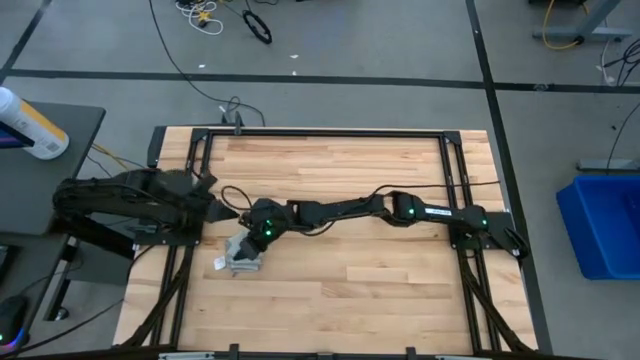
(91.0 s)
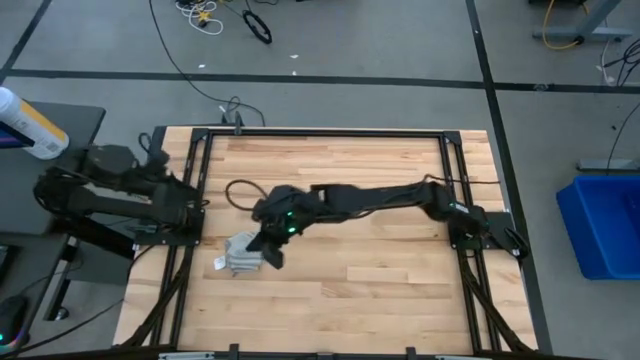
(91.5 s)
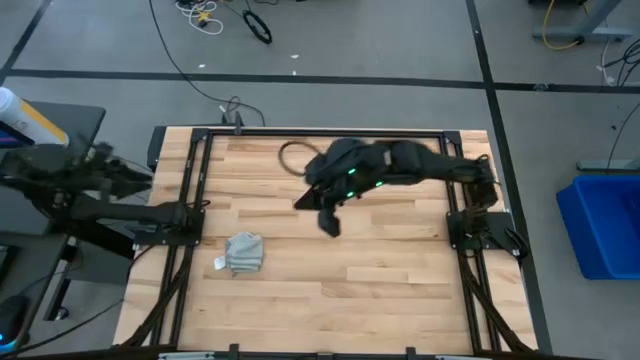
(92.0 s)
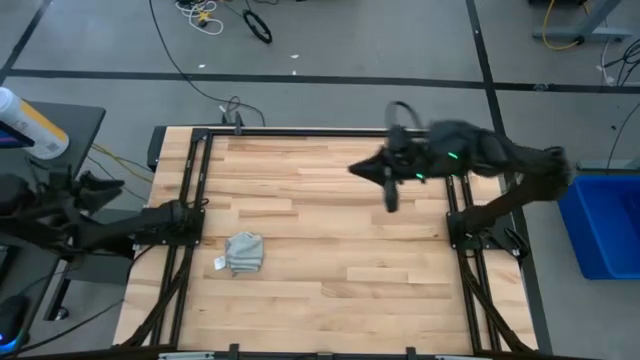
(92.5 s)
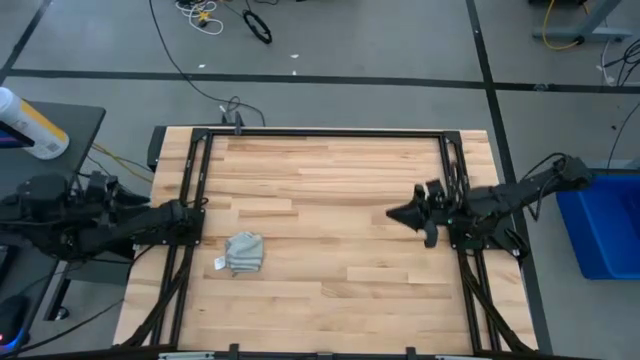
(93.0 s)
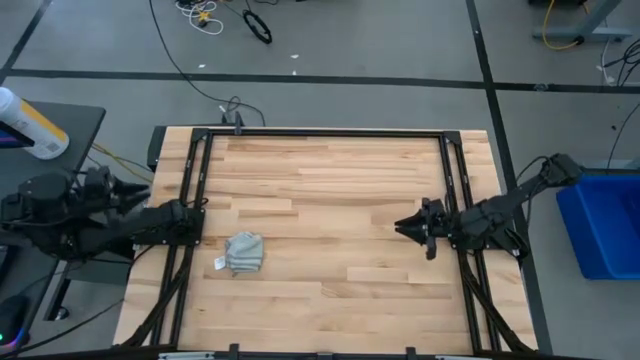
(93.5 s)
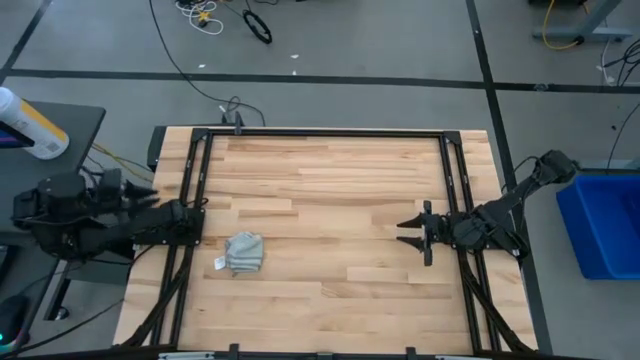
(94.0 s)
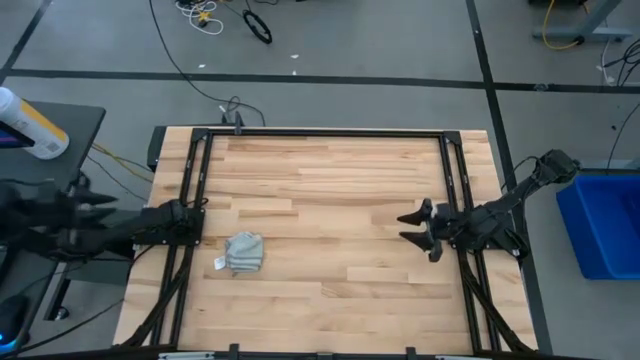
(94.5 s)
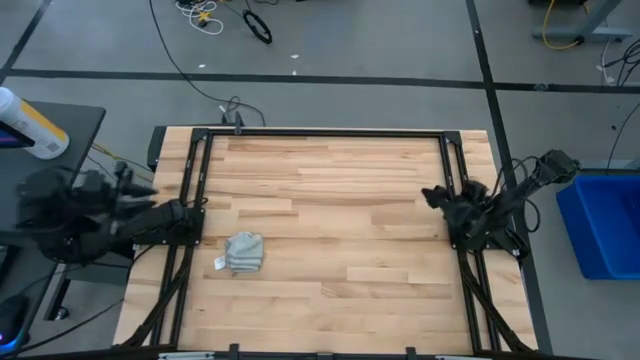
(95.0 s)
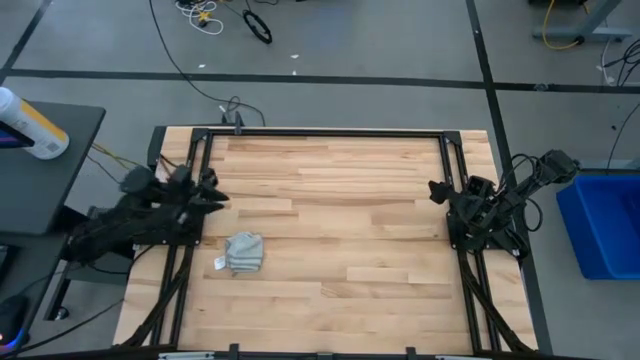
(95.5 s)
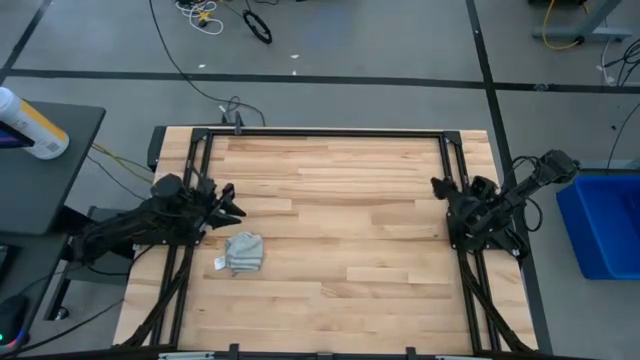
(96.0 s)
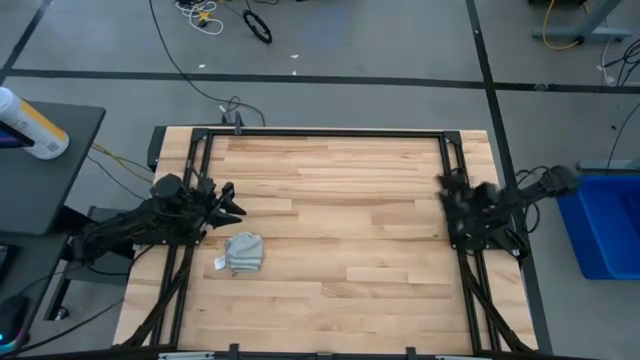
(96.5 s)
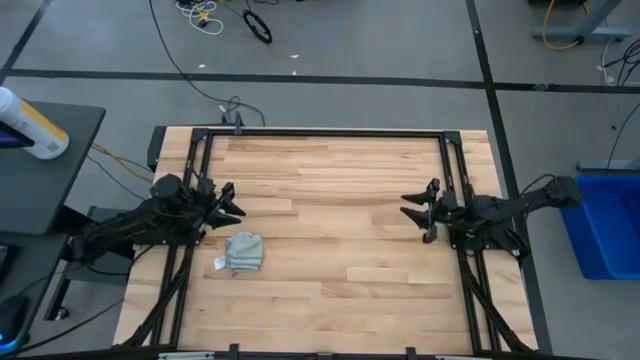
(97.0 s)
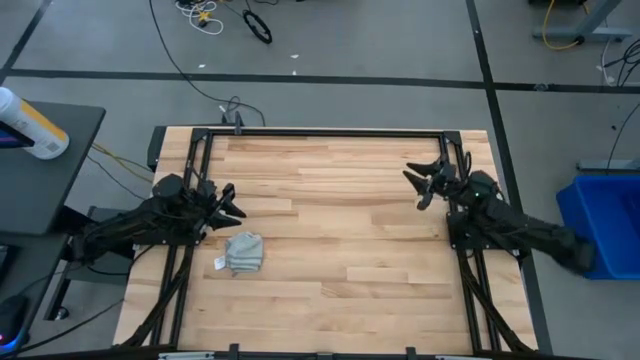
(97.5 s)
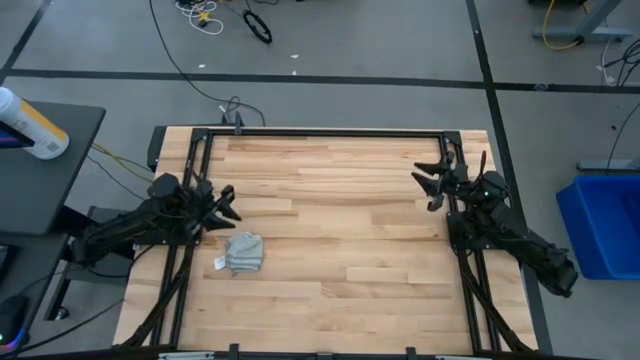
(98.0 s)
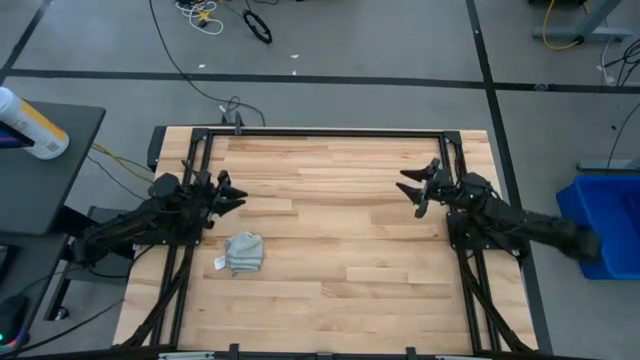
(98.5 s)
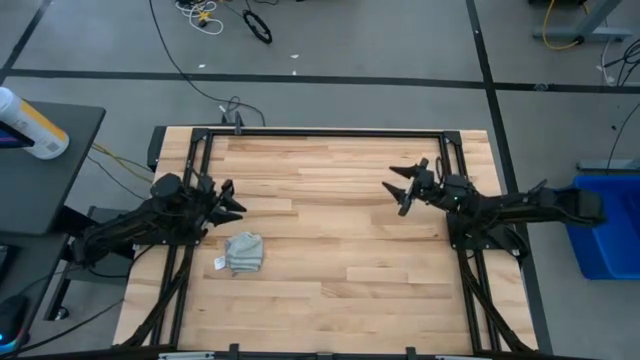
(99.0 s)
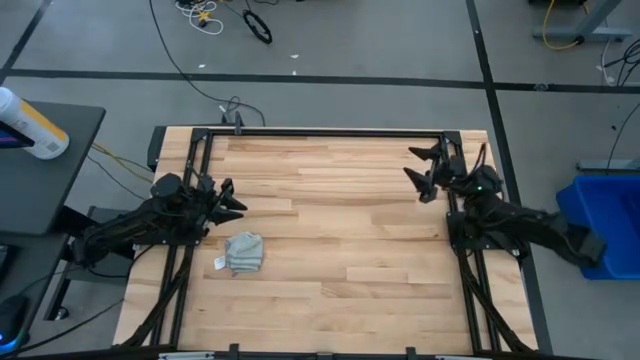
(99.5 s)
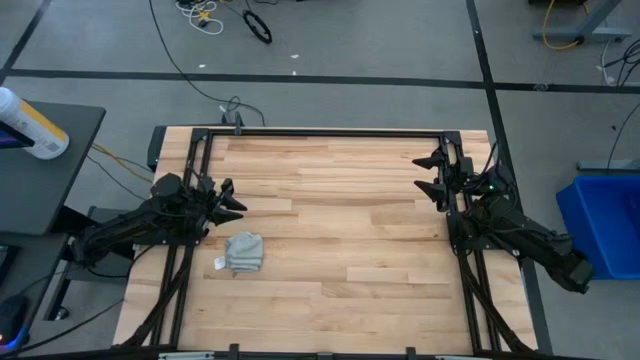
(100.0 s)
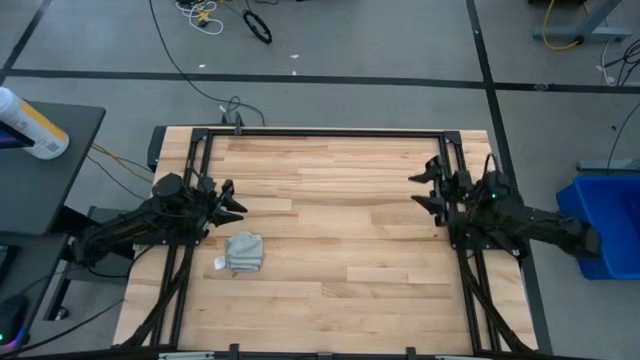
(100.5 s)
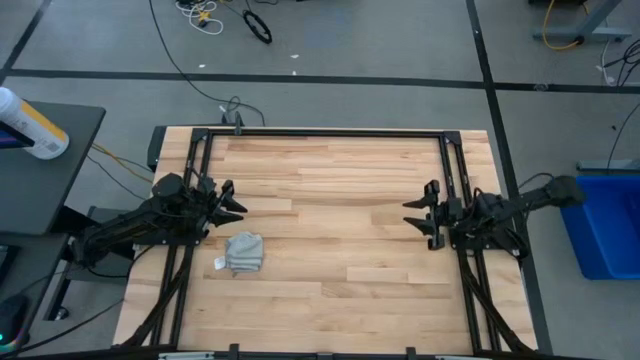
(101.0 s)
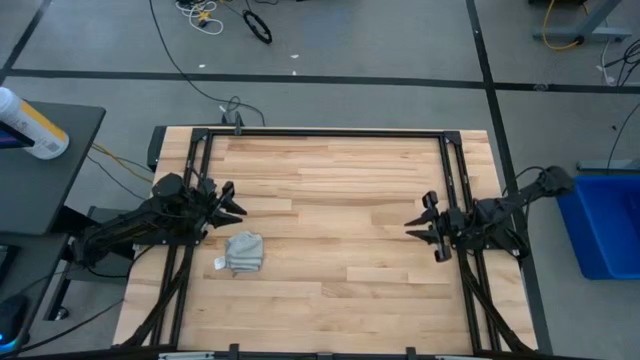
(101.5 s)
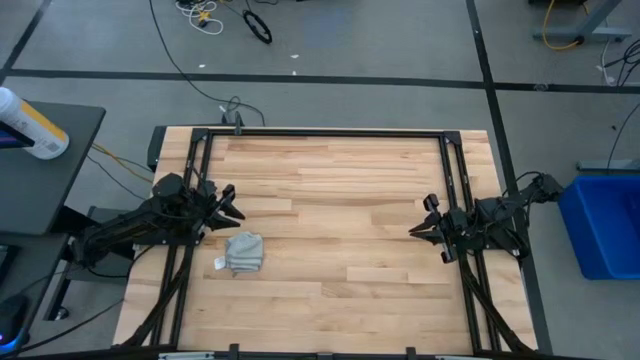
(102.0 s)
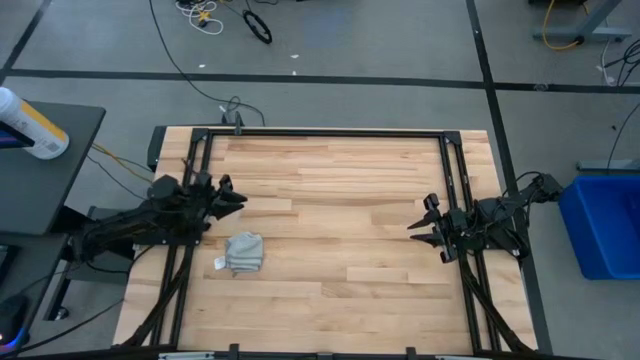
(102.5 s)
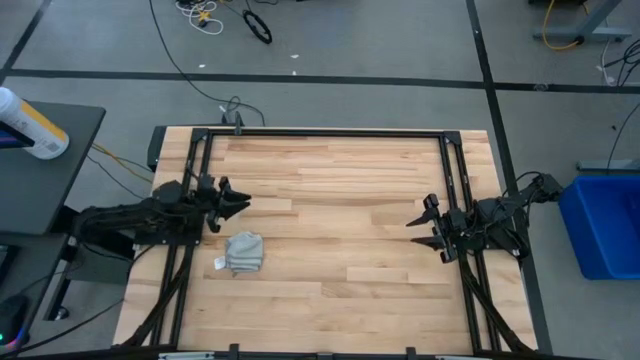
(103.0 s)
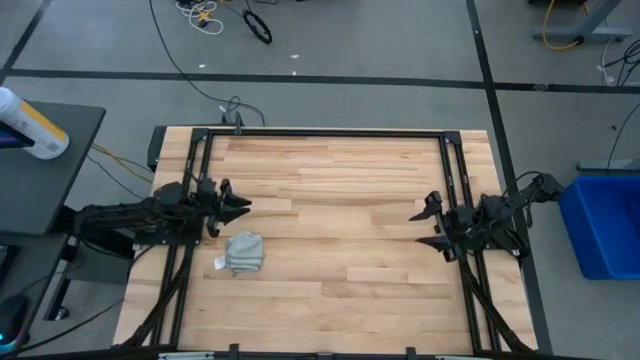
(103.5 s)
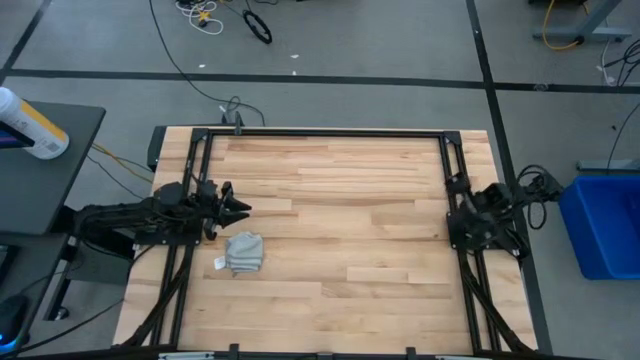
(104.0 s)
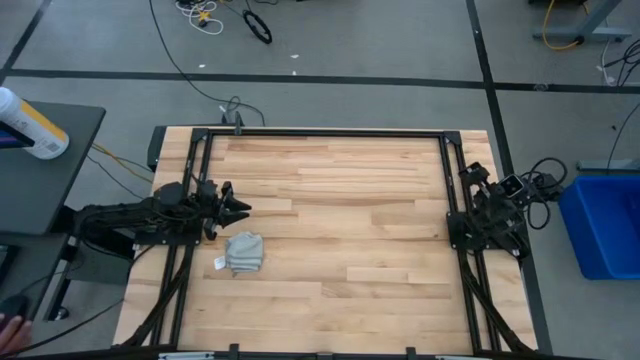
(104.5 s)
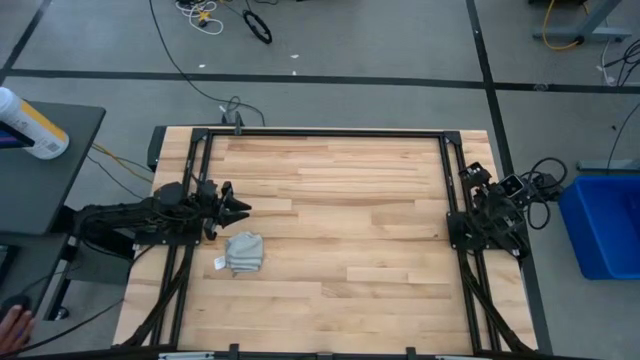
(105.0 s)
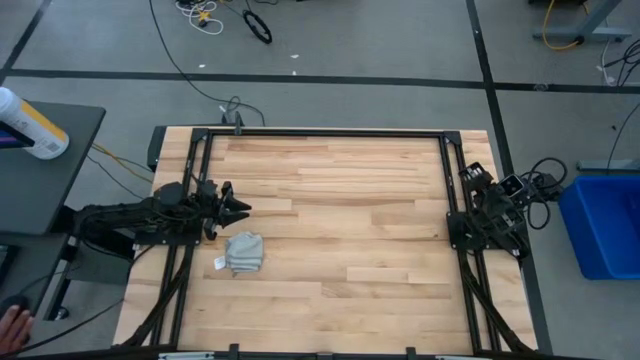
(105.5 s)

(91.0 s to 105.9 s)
Task: Fold microfiber towels
Return to Home Position

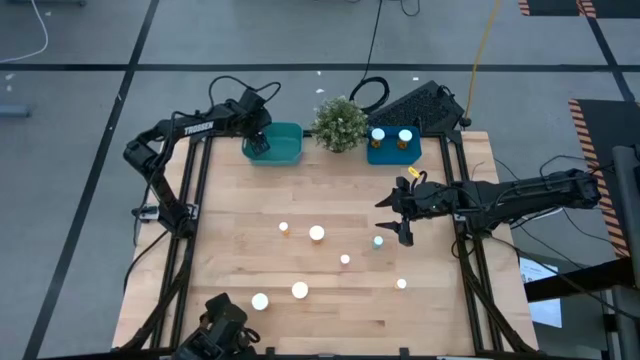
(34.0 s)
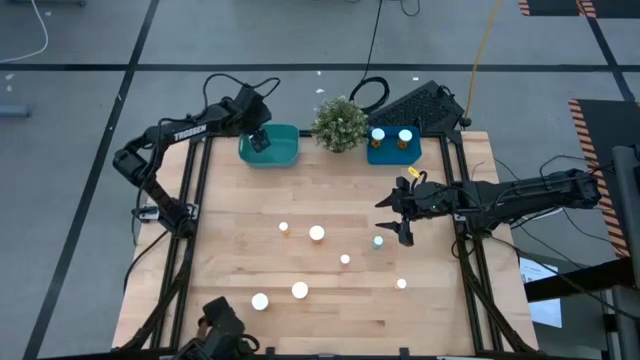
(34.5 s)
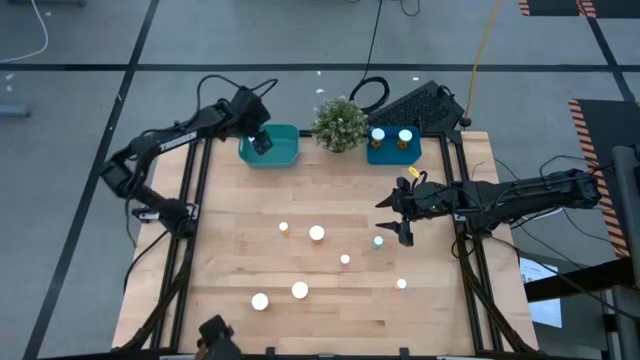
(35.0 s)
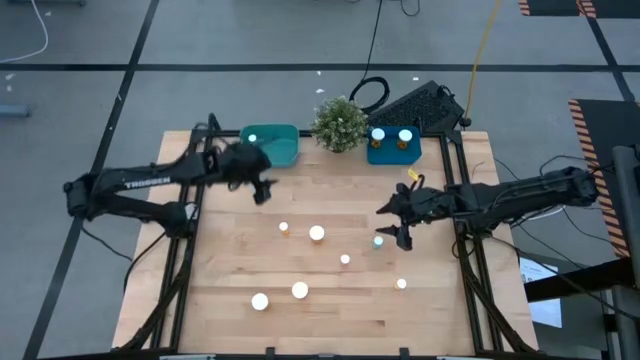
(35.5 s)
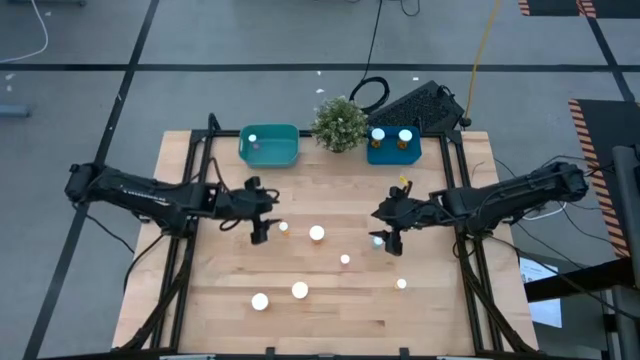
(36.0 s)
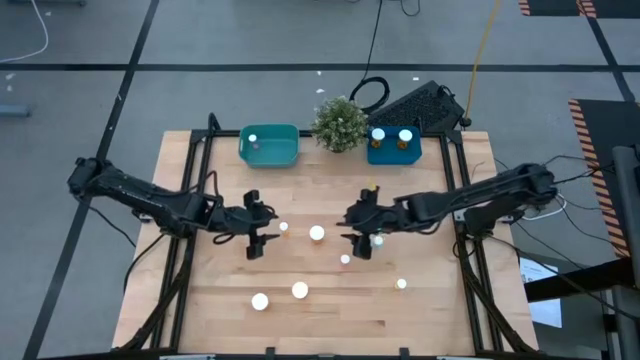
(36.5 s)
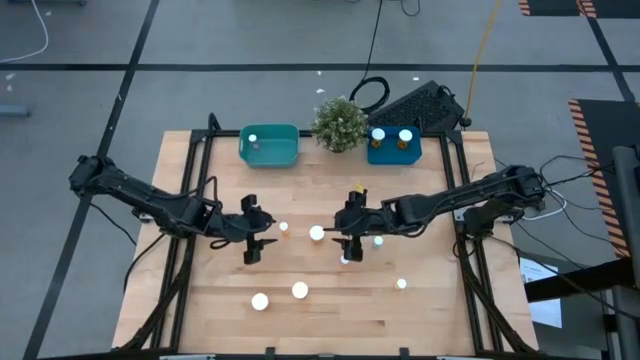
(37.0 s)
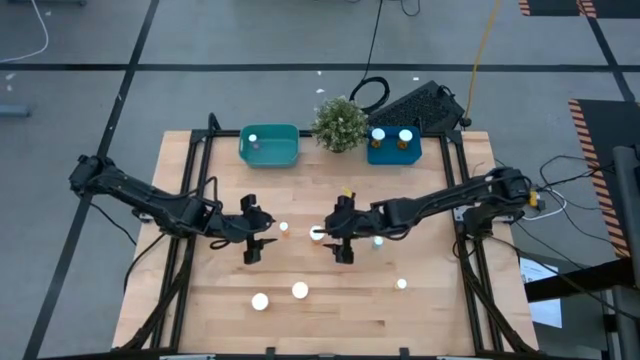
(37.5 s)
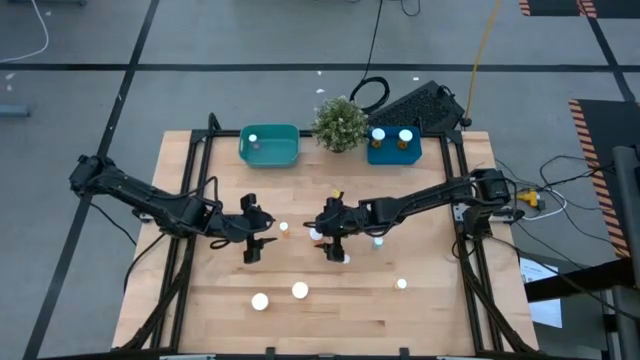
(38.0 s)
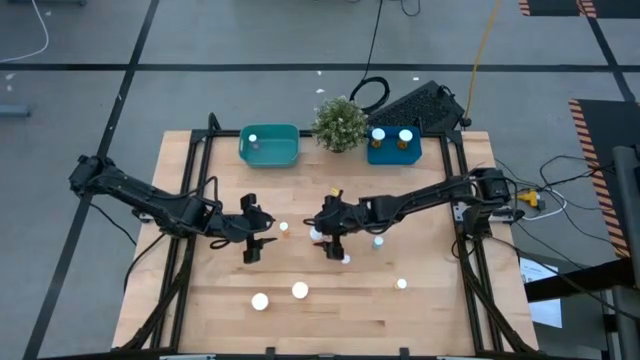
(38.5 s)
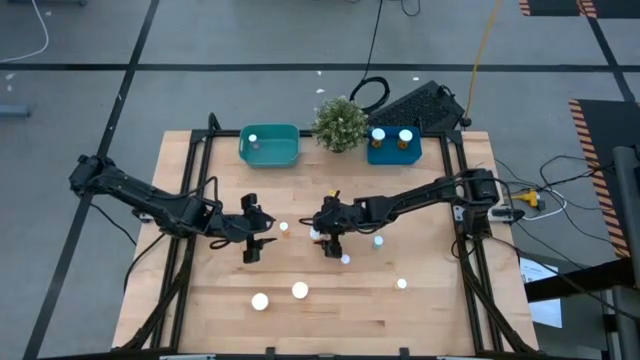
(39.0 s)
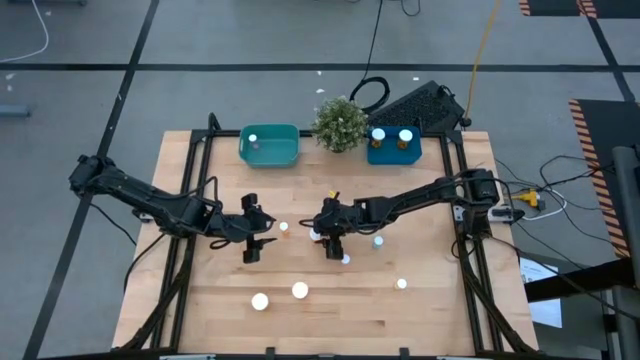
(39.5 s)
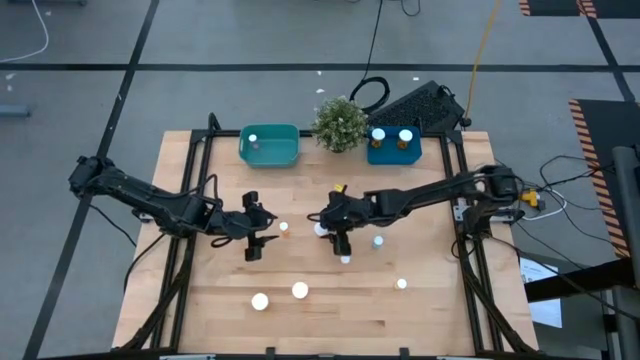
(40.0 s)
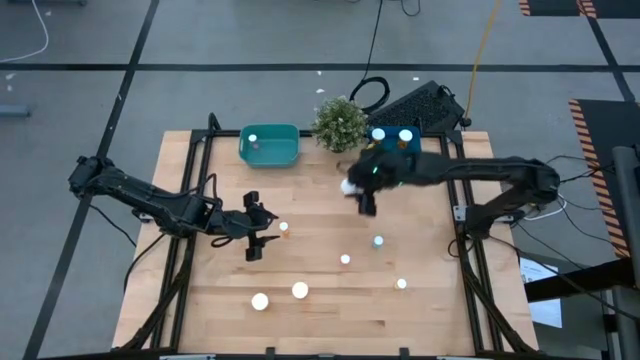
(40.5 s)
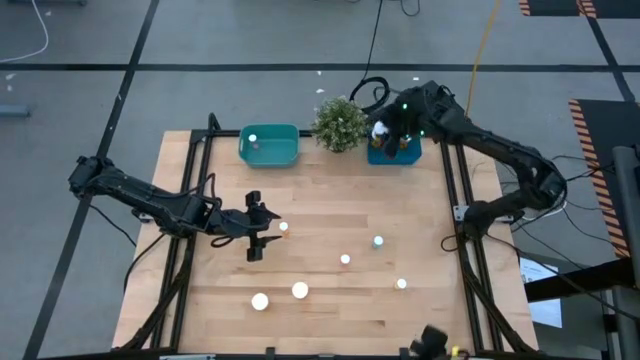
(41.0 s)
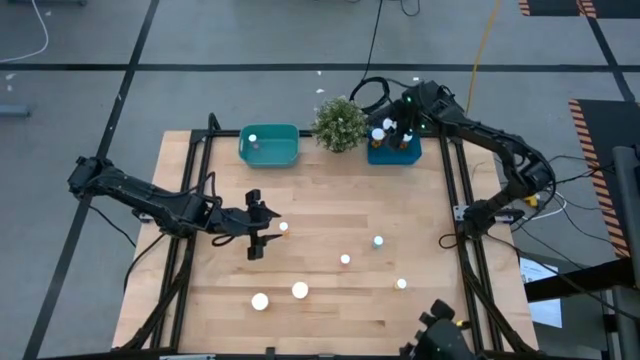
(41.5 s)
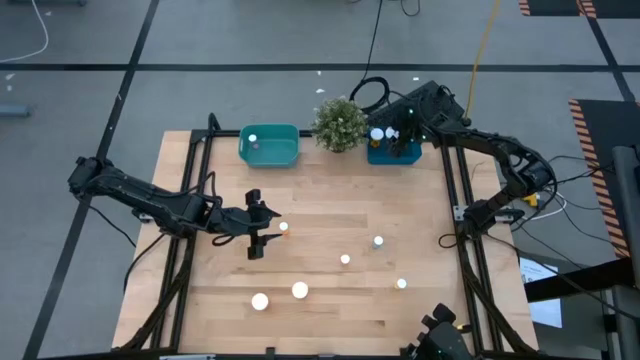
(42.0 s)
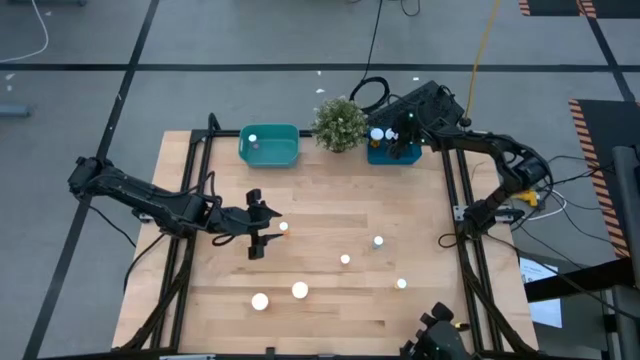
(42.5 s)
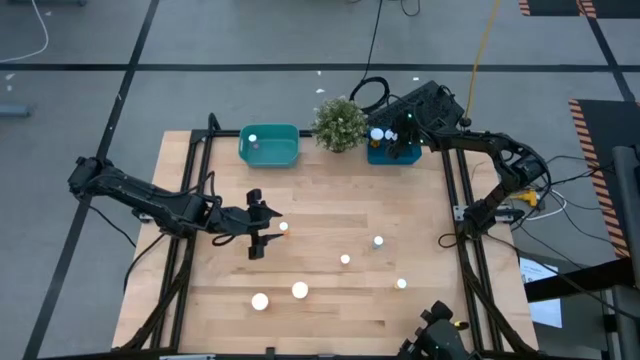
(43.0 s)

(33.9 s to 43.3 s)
Task: Pick and place medicine bottles into bin by pill shape (circle, oval)
Put the large orange pill bottle into the blue bin
